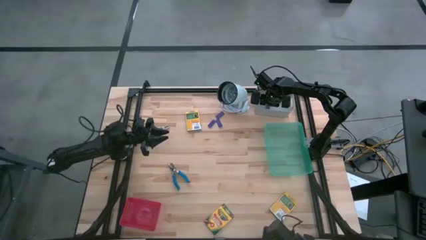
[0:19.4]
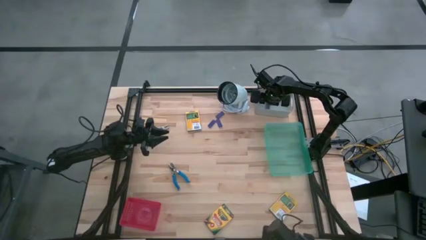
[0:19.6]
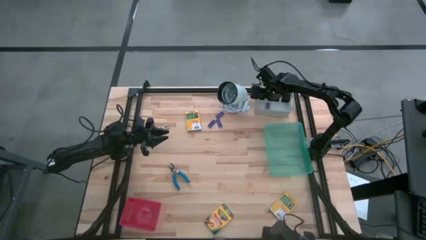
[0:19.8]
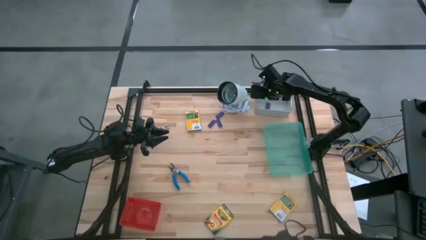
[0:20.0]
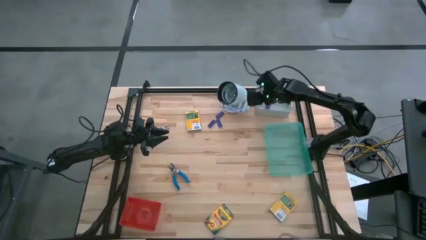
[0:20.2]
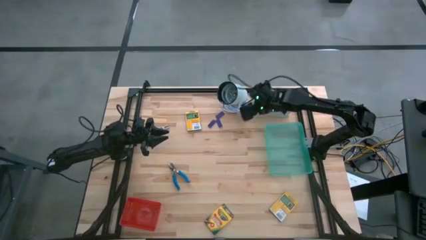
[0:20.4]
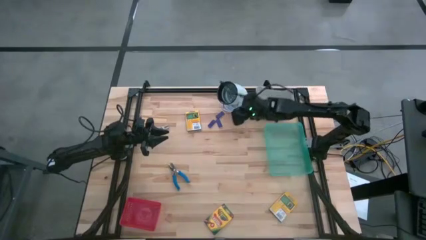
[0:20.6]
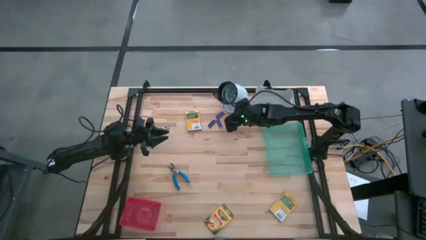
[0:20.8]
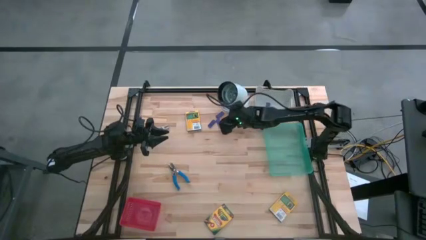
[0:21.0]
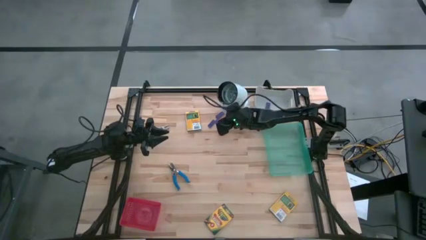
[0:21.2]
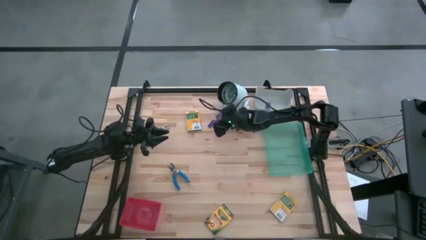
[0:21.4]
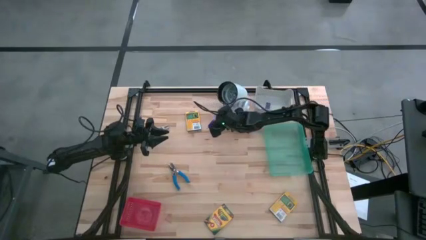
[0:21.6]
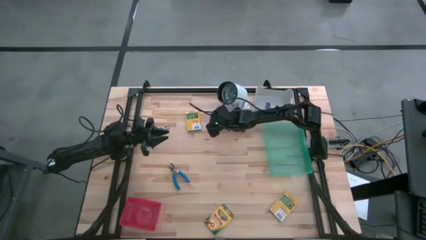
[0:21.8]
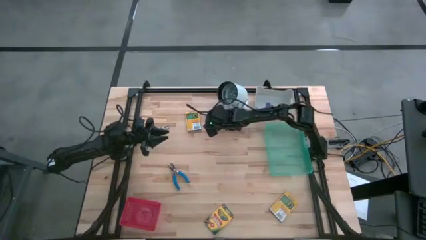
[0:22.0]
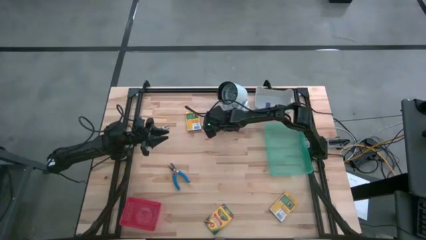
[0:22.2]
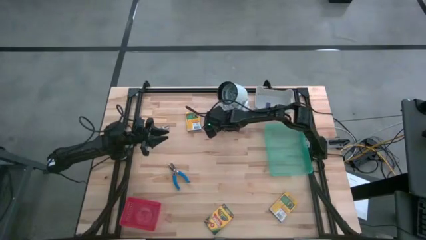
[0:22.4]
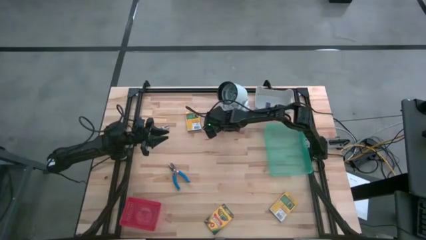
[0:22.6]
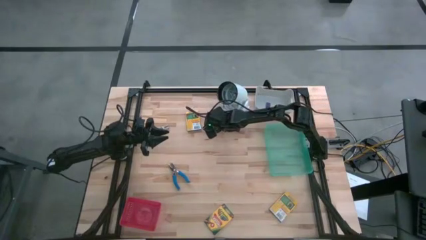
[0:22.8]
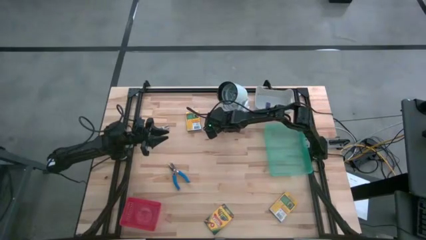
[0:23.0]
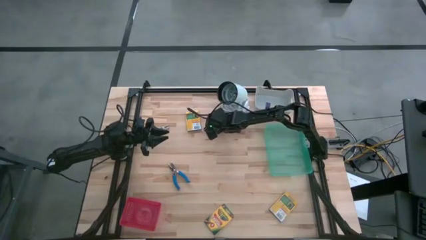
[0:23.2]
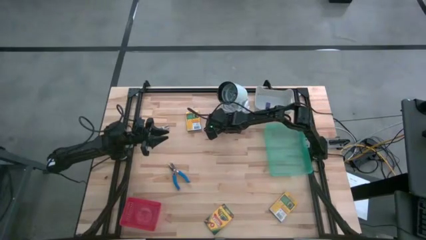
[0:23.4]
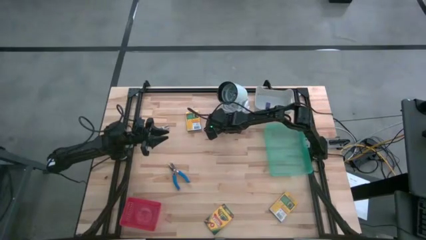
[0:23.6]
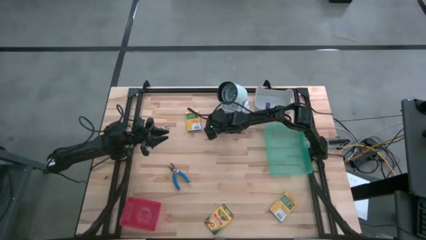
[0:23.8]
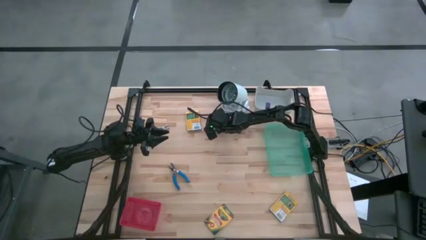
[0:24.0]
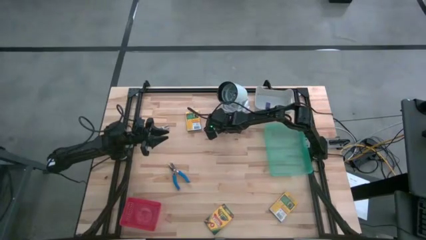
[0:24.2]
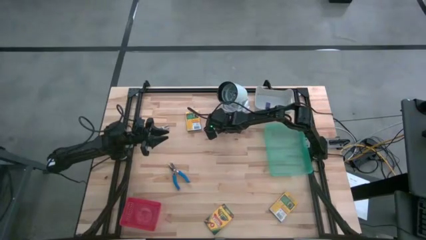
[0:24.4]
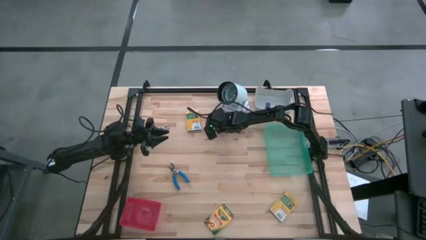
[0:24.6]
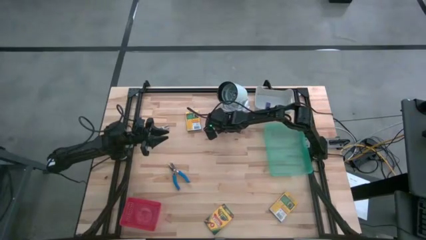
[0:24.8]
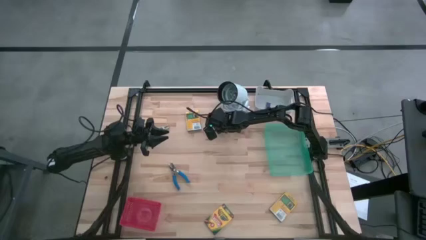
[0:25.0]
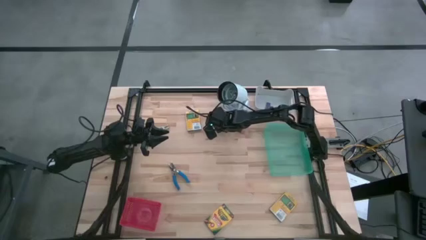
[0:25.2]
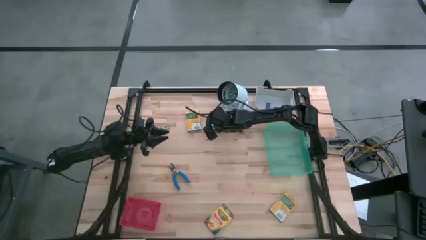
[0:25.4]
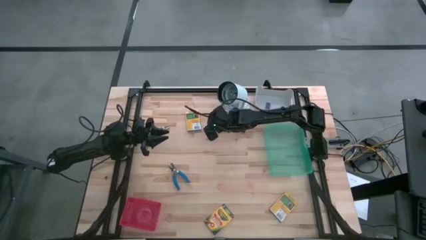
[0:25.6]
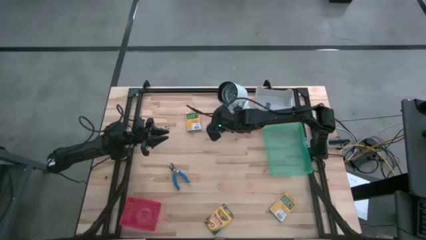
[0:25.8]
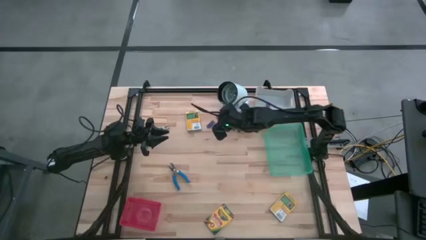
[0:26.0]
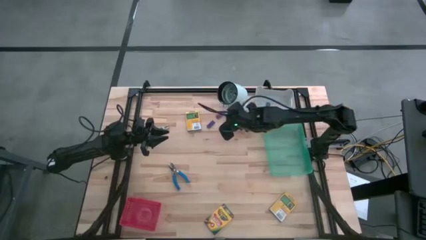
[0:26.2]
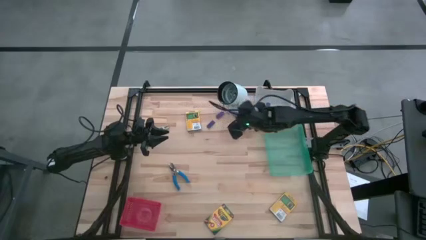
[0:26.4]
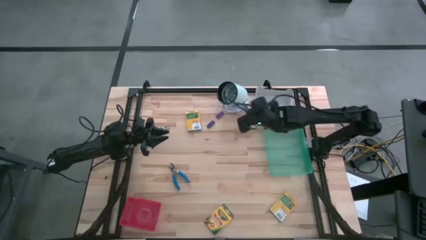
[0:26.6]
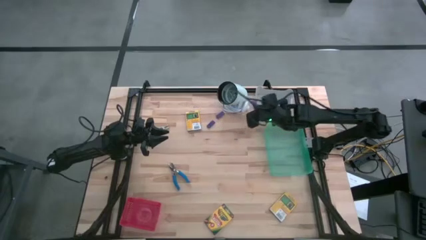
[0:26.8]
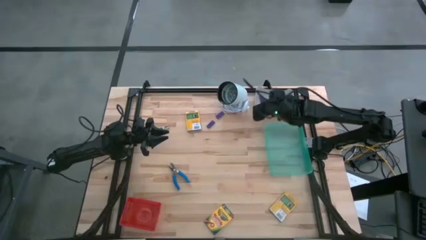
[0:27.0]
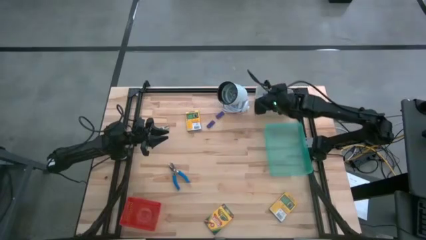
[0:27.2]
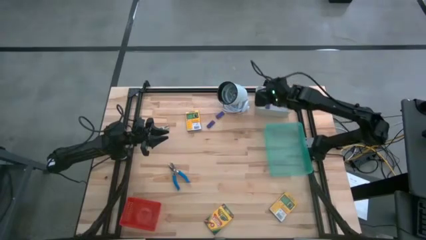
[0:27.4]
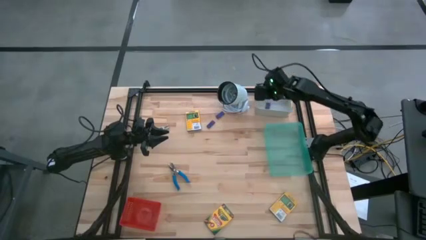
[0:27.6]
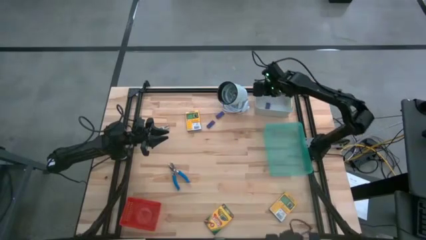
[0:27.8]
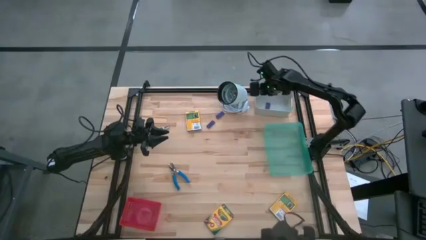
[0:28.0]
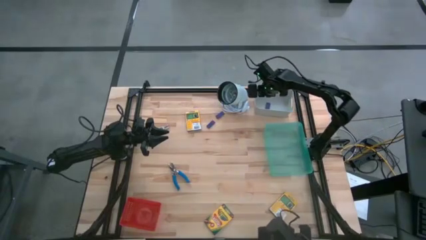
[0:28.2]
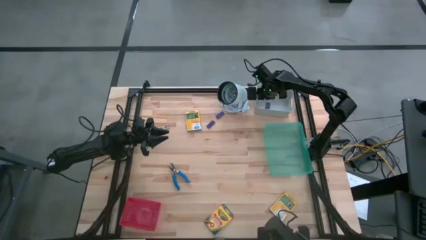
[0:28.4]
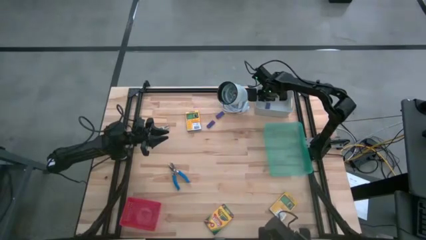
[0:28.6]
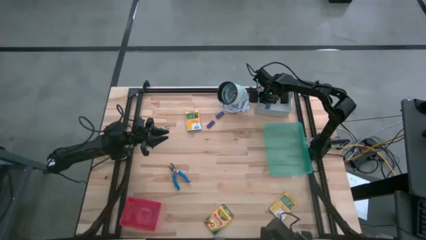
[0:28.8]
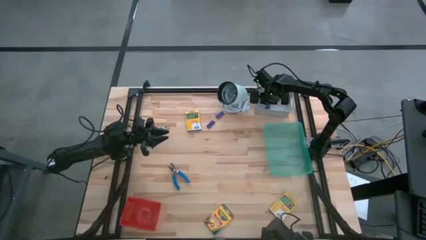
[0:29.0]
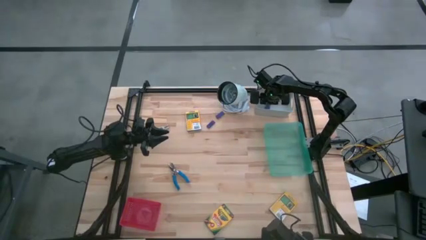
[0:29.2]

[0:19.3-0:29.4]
Task: Pick & Place School Supplies
Put the blue eraser into the gray bin
